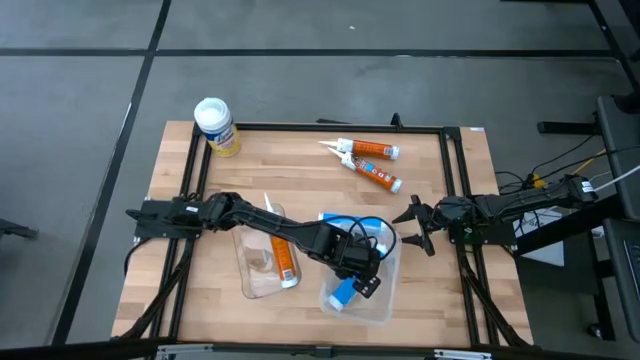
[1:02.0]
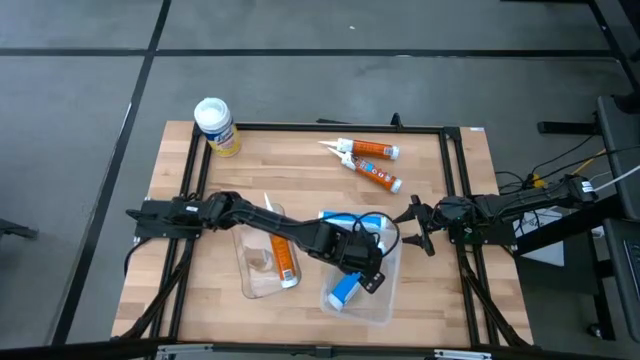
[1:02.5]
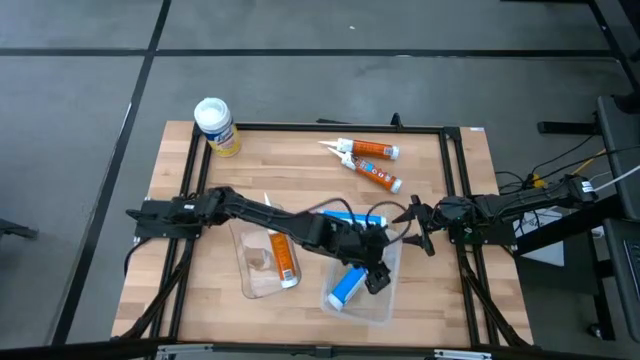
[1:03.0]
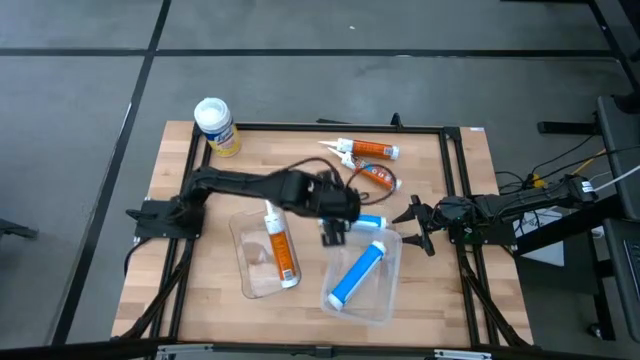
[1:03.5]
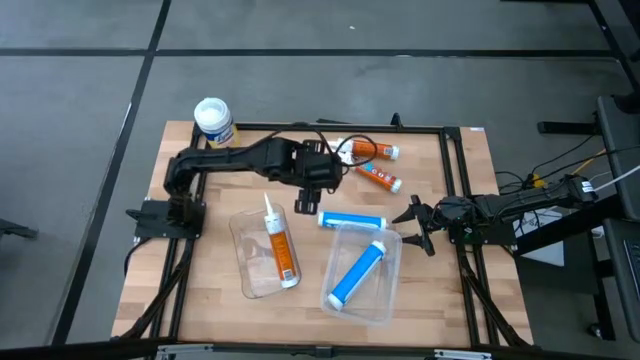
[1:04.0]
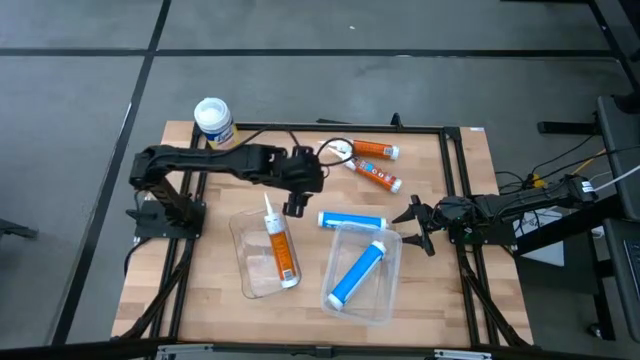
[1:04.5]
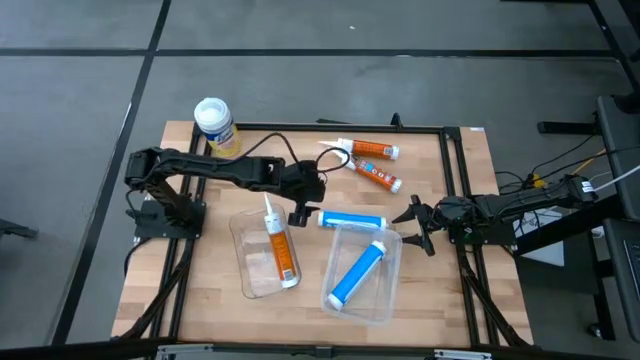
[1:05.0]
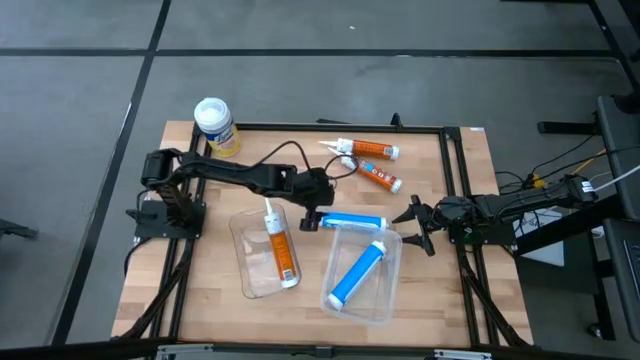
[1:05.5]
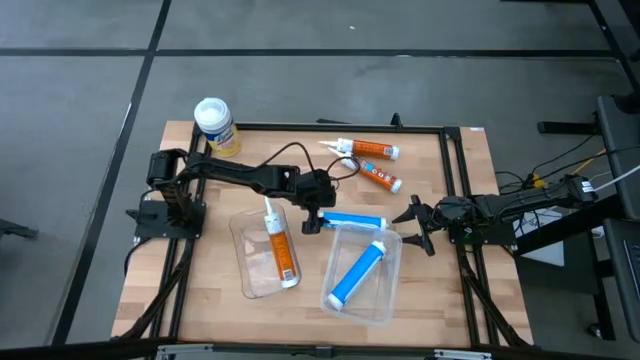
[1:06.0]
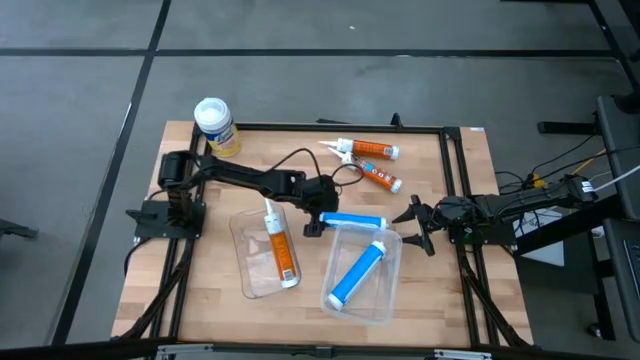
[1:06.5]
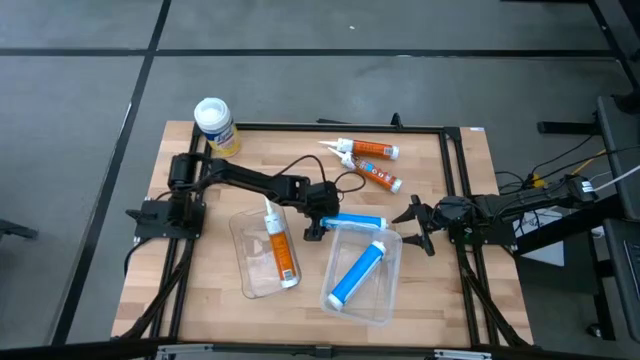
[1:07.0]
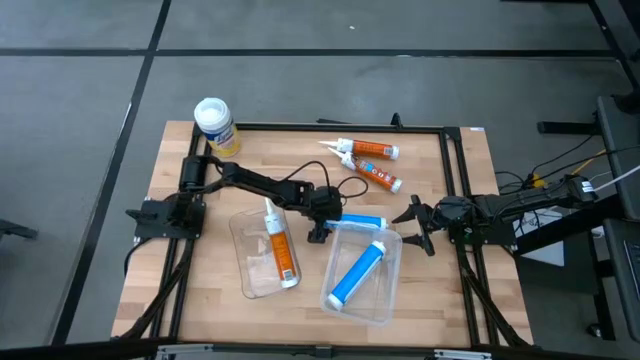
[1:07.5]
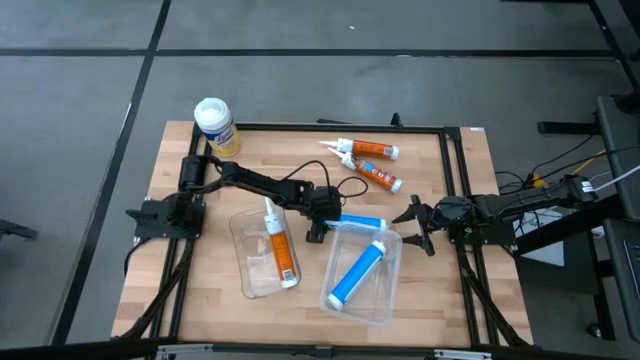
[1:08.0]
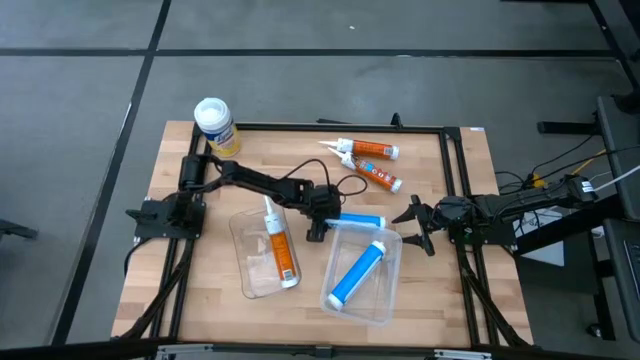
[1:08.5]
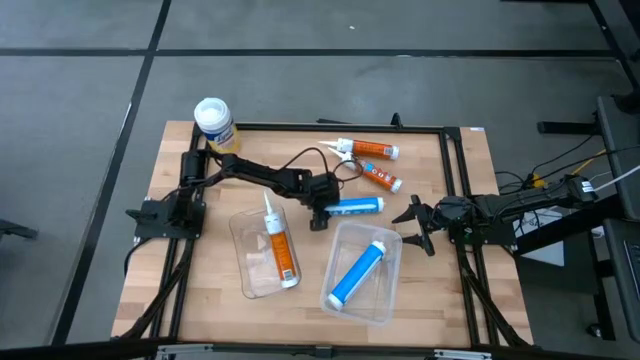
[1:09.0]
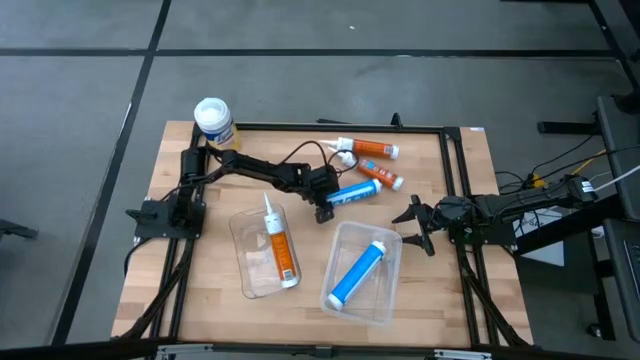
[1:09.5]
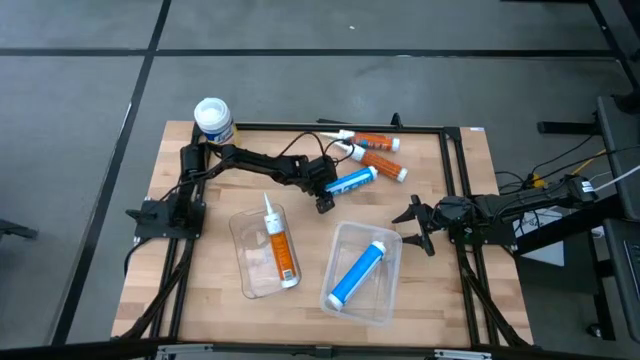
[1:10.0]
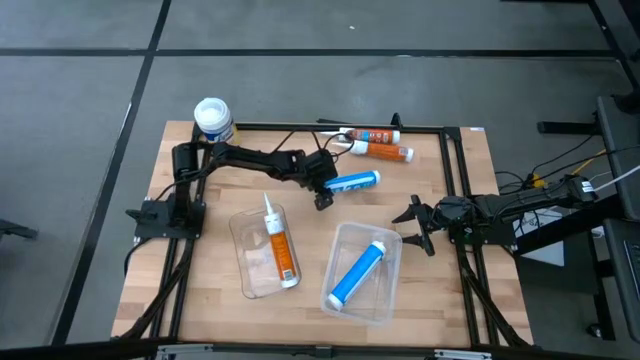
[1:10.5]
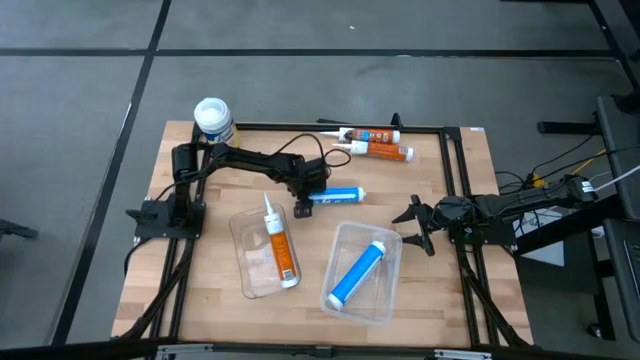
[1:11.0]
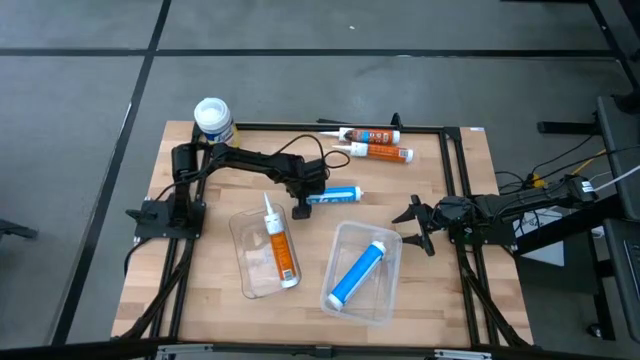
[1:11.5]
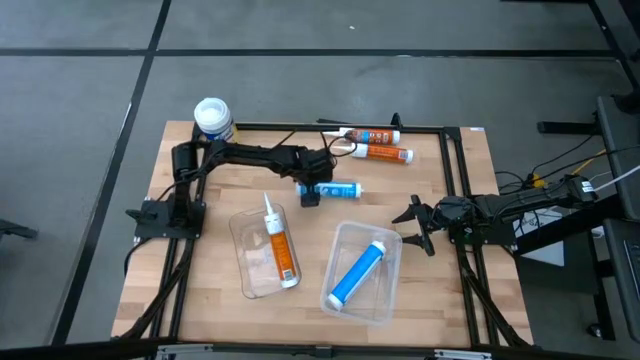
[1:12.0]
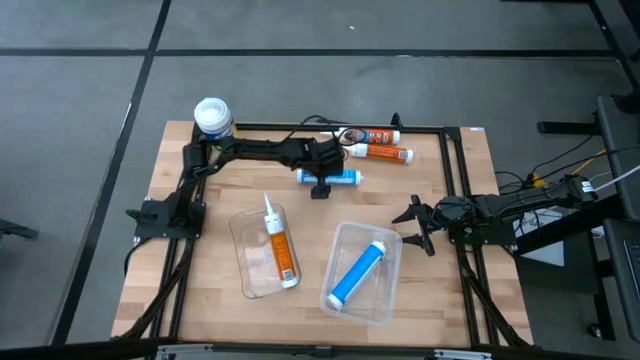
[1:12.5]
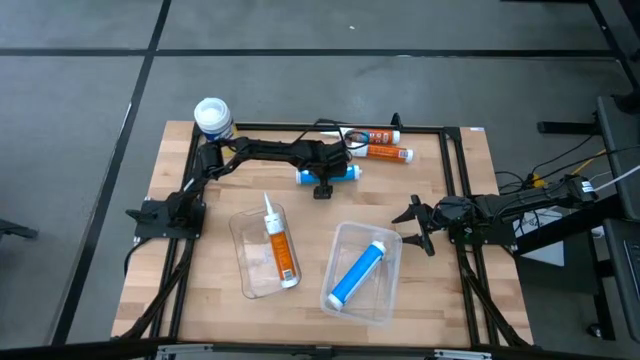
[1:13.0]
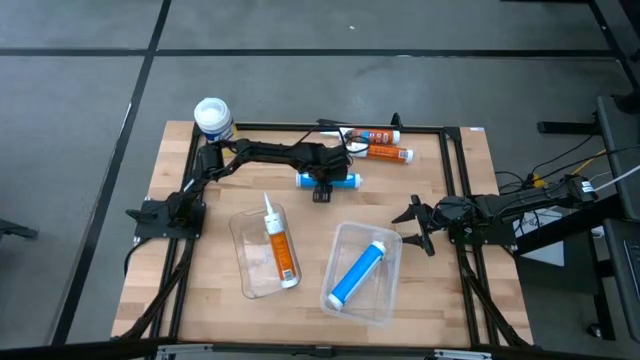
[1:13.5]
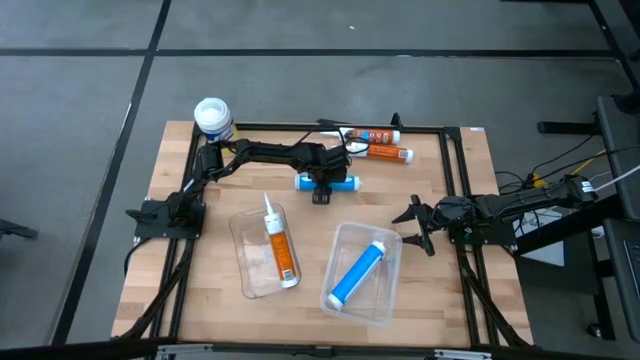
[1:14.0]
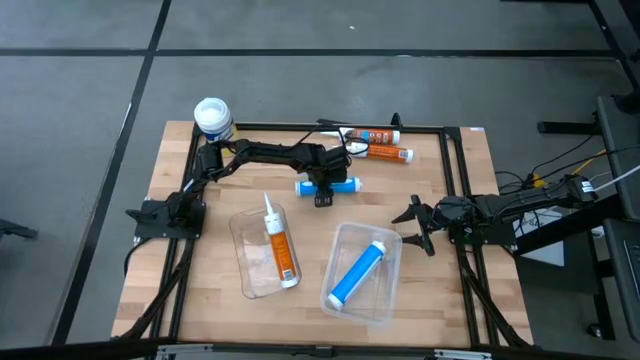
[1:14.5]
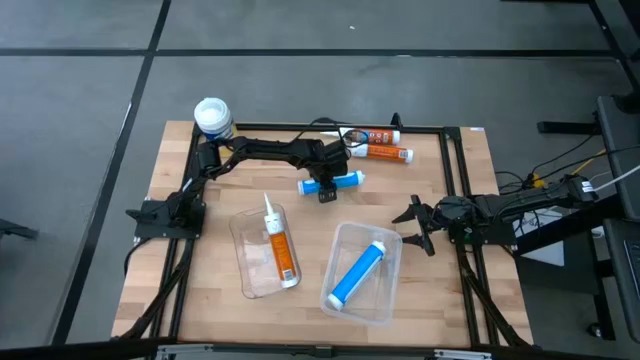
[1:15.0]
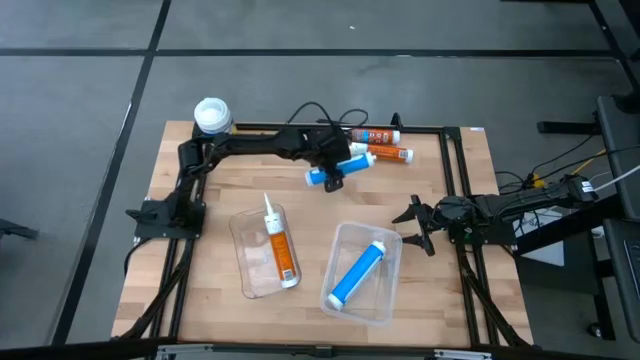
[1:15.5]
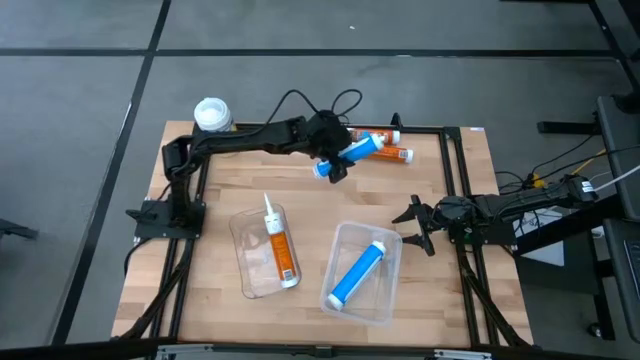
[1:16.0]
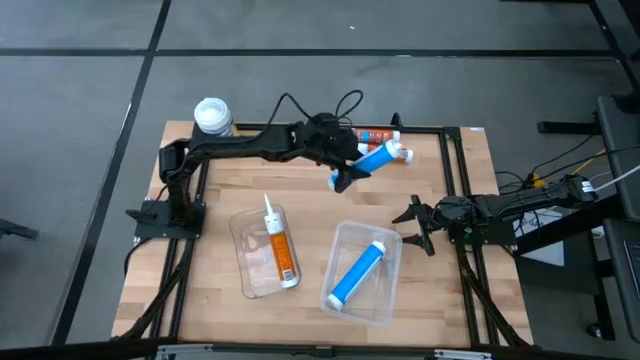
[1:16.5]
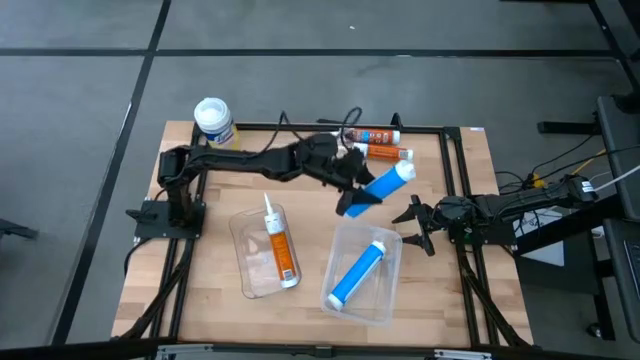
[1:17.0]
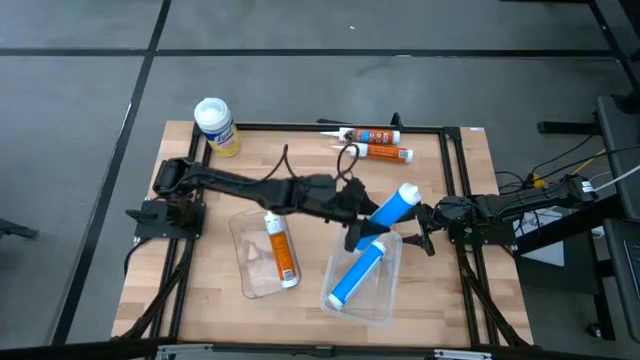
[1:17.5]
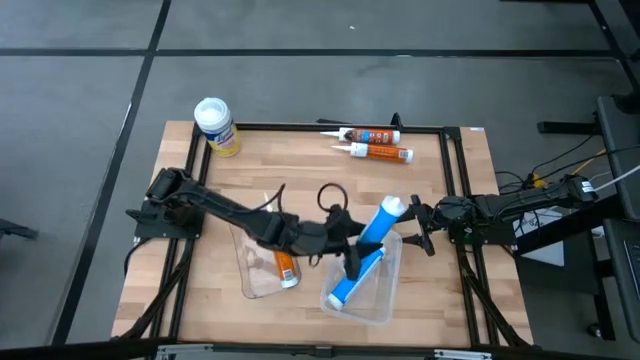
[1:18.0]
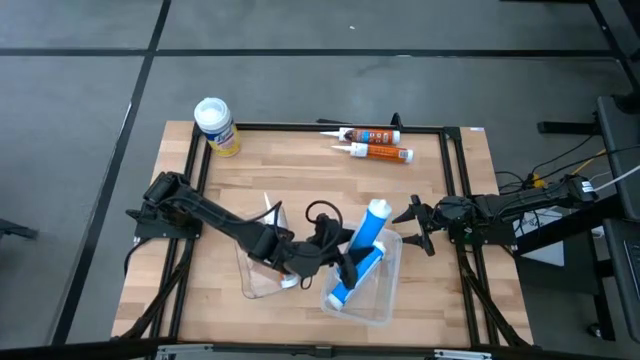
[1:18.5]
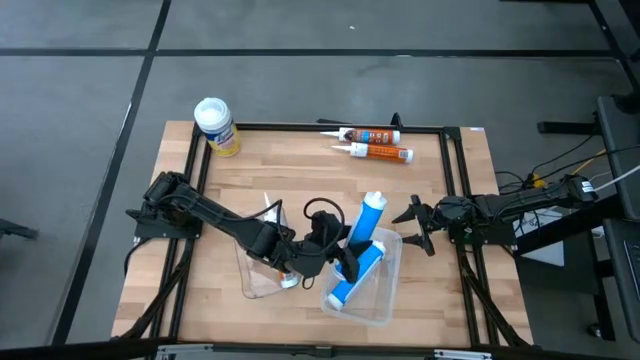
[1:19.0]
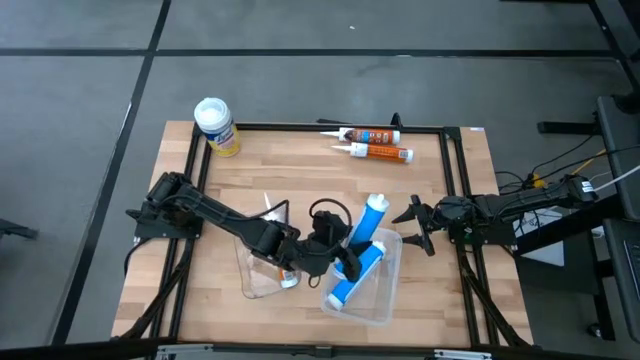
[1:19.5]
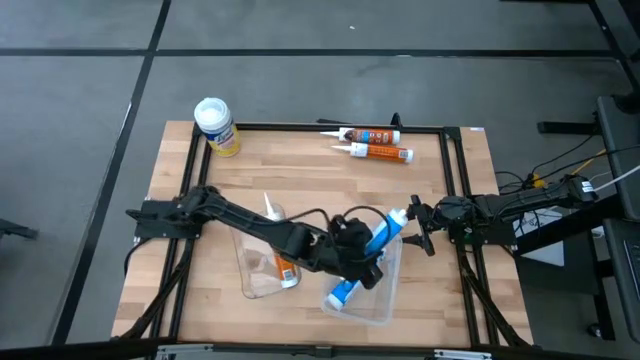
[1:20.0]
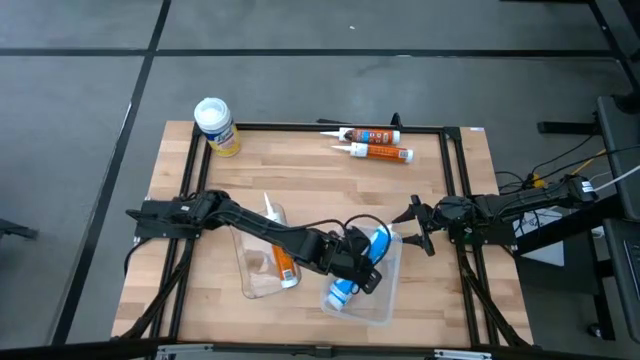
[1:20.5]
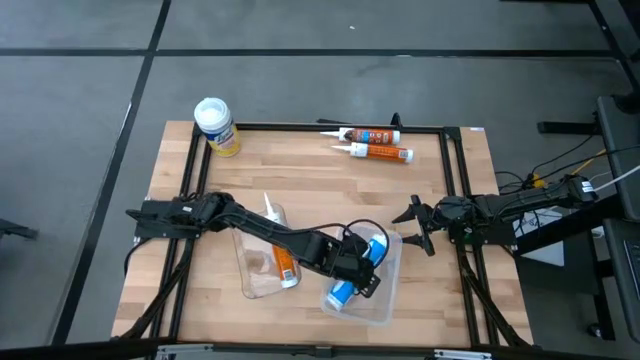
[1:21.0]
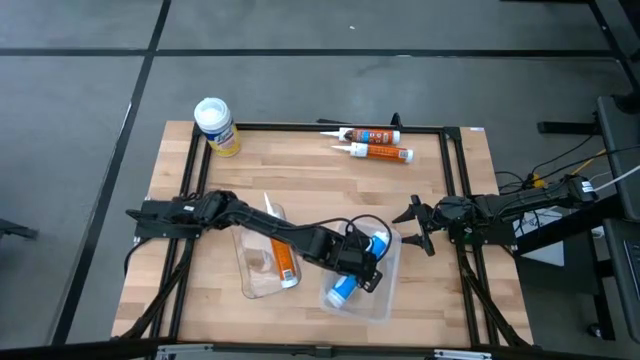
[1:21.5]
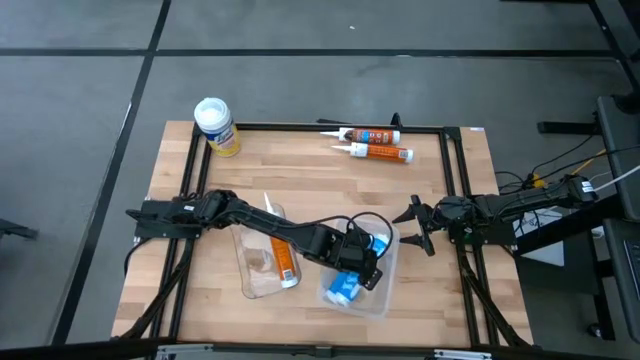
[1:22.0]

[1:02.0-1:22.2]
Task: Pick & place silicon tubes, Sealant and Lysol wipes
Put the blue sealant into the right transparent bin

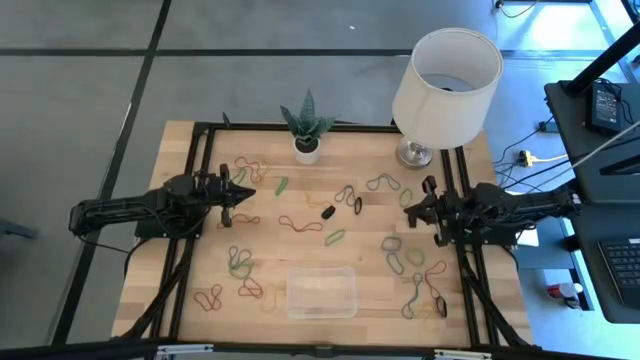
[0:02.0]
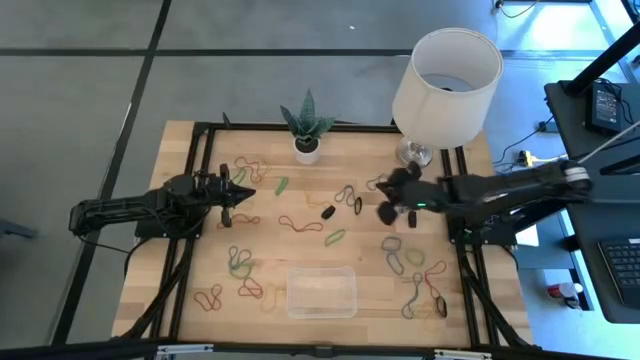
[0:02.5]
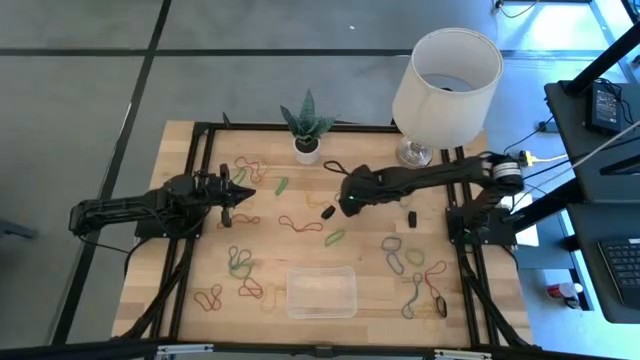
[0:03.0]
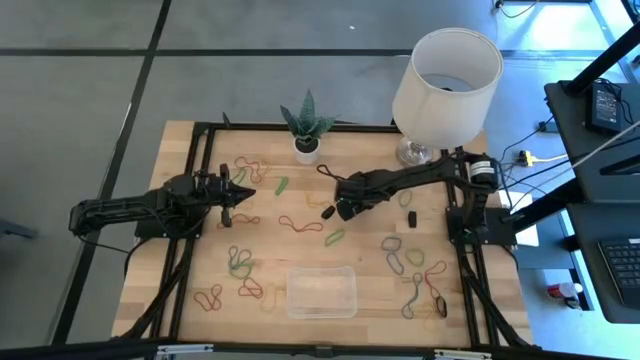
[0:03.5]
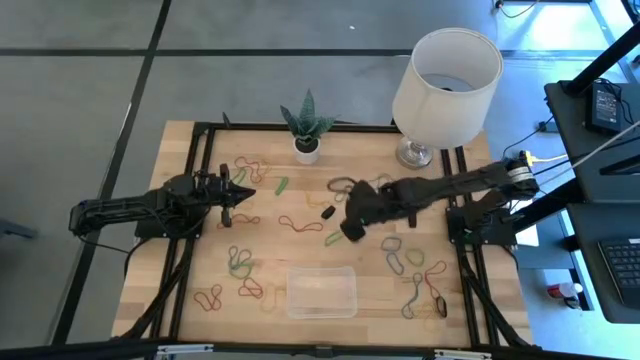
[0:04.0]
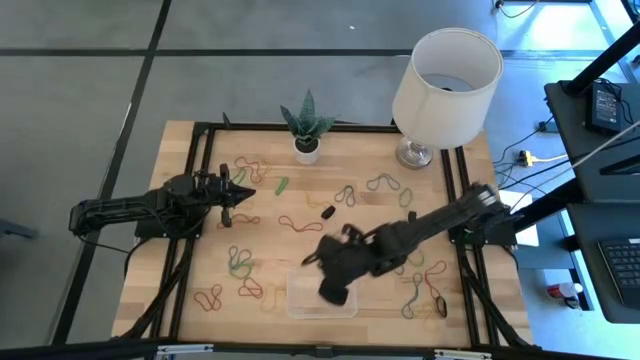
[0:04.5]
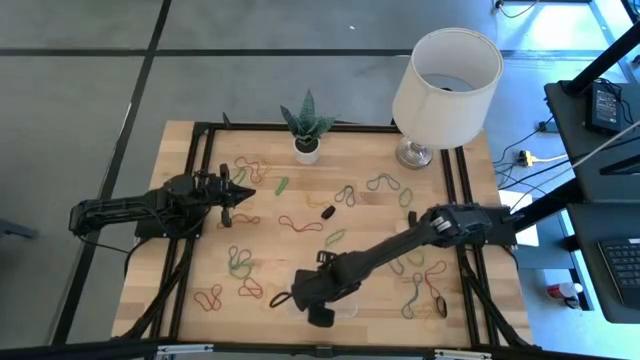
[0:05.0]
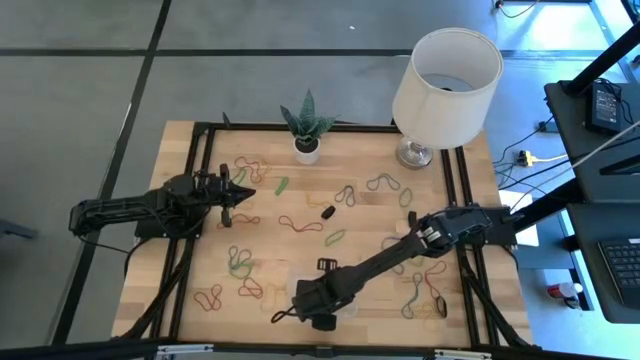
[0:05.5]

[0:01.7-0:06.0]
Task: Pick and place rubber bands into bin
Put the black rubber band into the transparent bin
